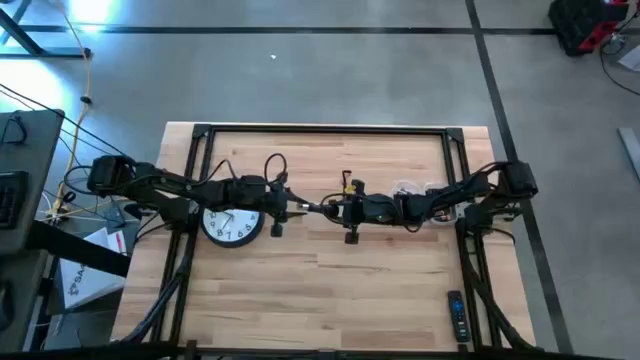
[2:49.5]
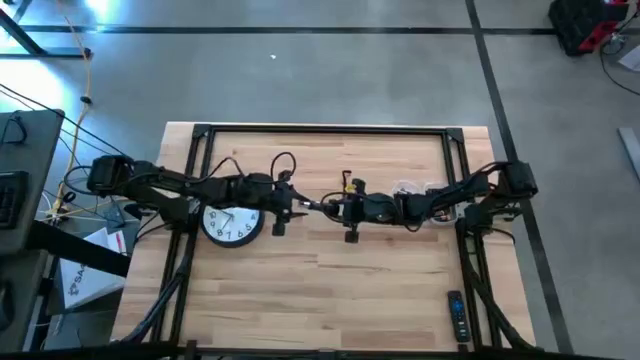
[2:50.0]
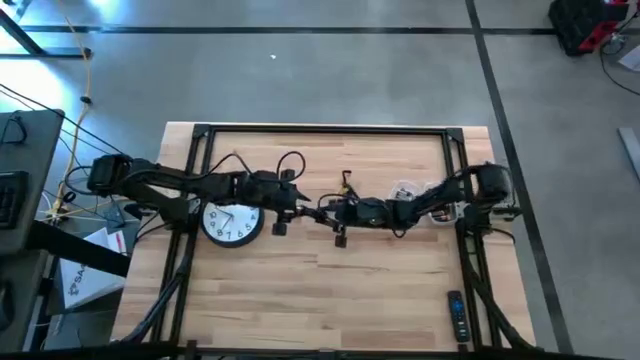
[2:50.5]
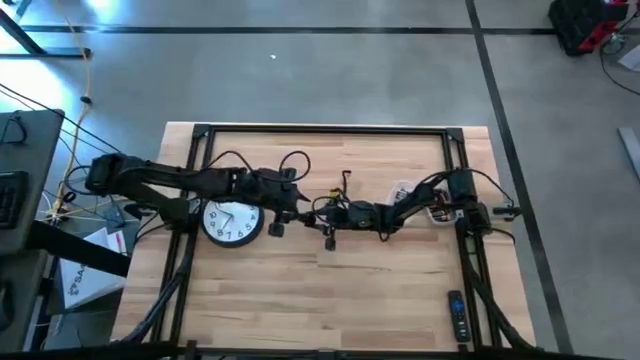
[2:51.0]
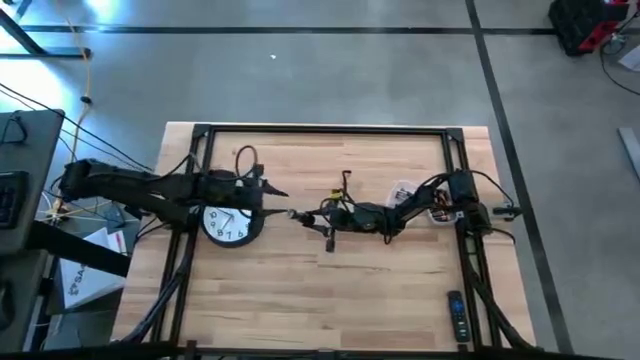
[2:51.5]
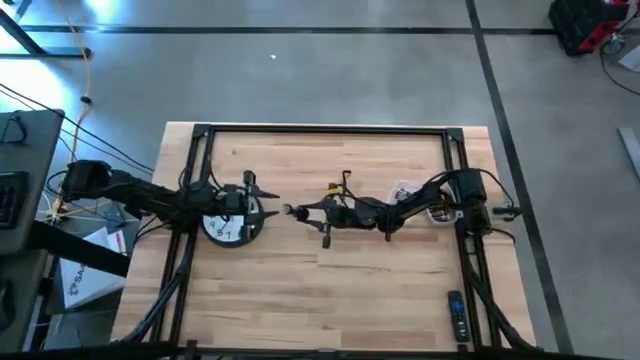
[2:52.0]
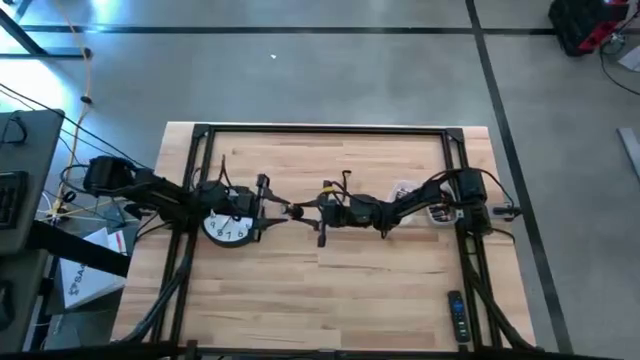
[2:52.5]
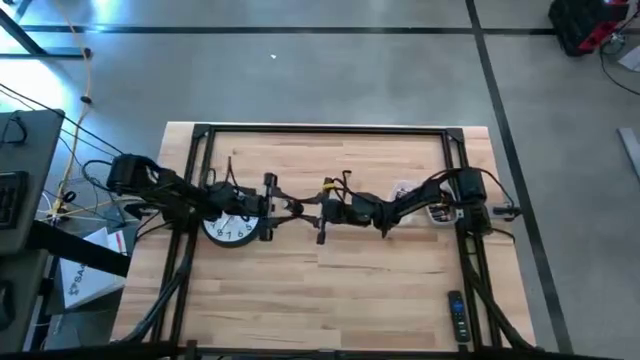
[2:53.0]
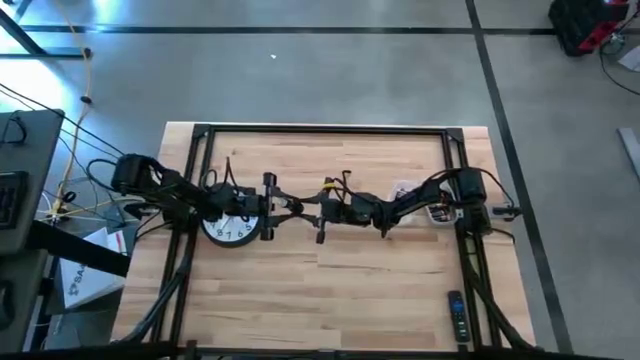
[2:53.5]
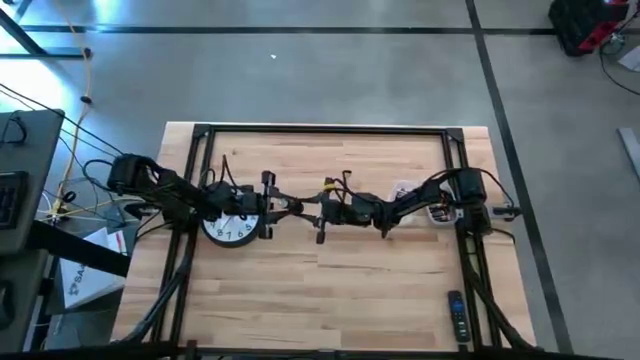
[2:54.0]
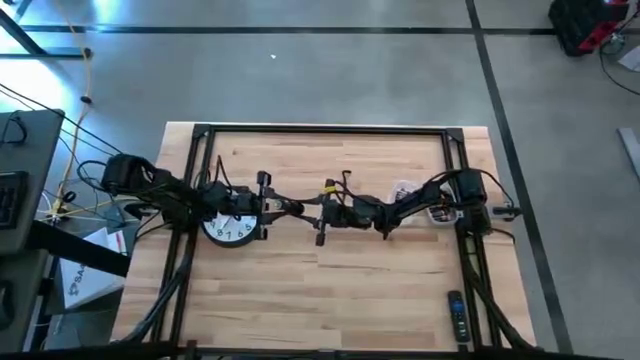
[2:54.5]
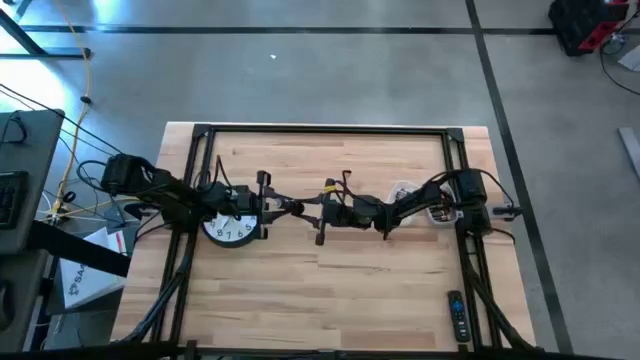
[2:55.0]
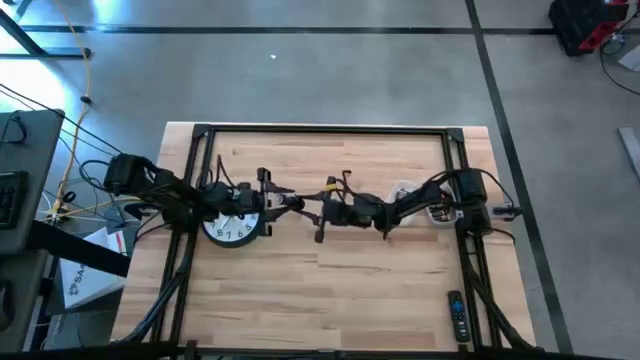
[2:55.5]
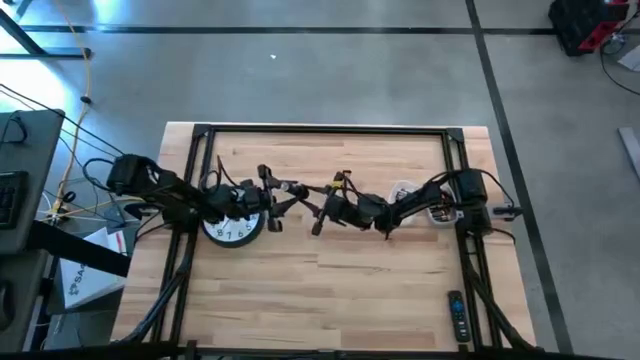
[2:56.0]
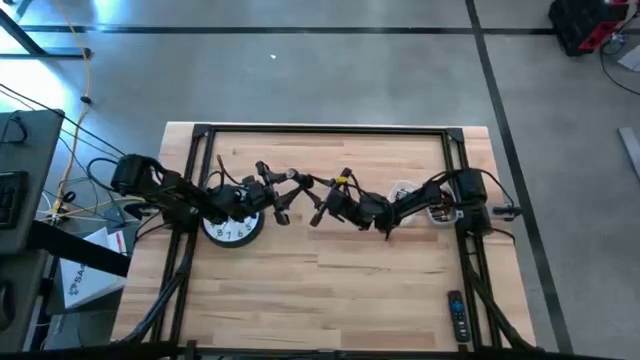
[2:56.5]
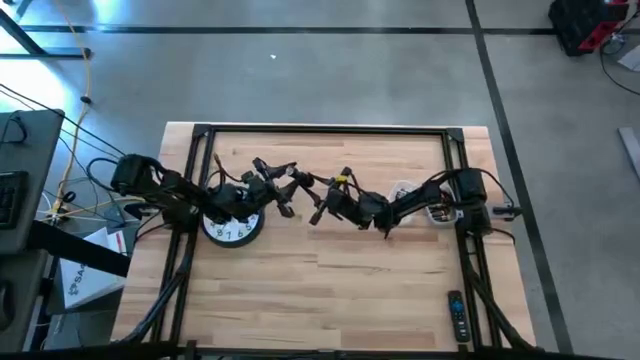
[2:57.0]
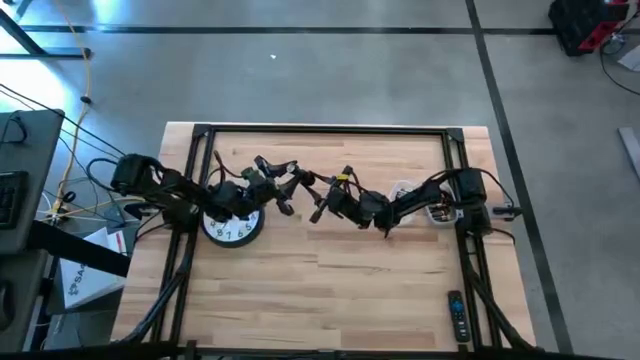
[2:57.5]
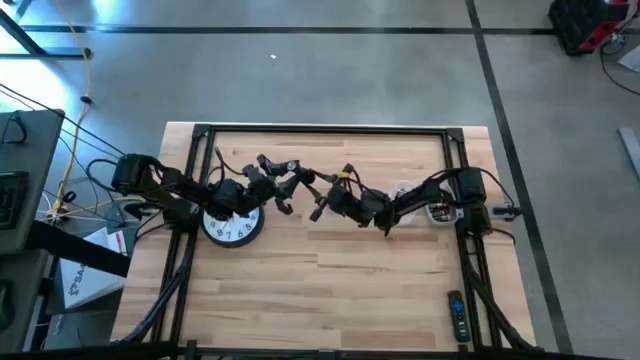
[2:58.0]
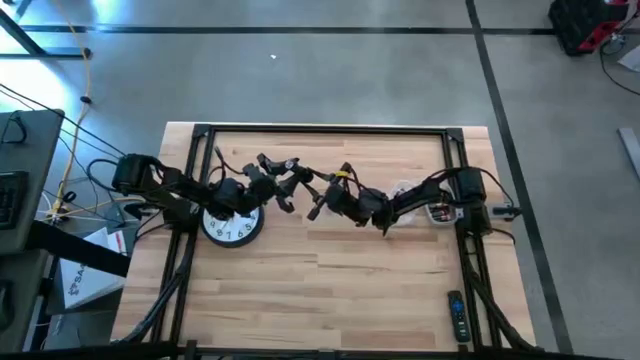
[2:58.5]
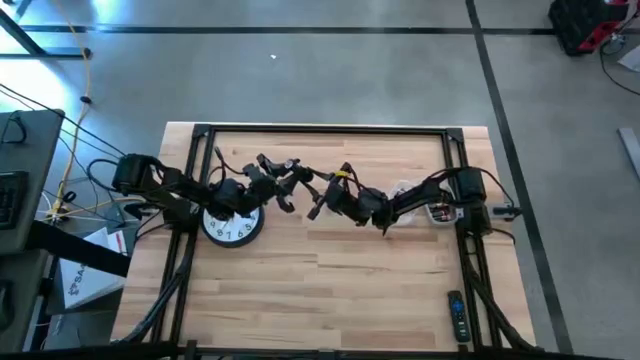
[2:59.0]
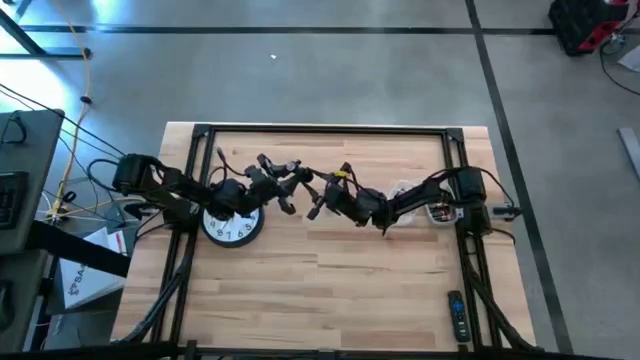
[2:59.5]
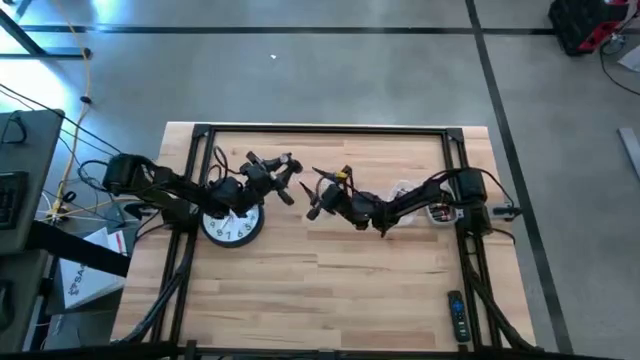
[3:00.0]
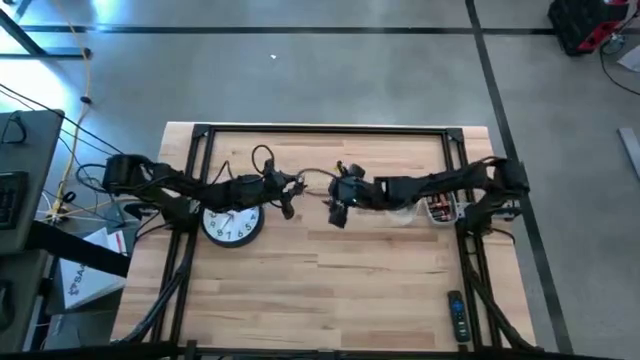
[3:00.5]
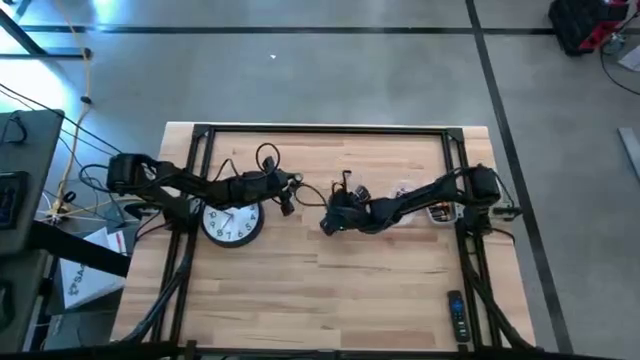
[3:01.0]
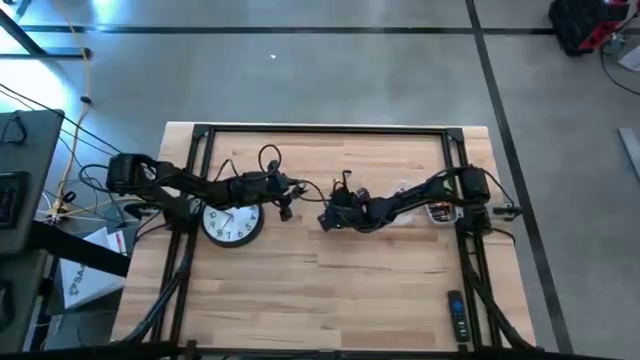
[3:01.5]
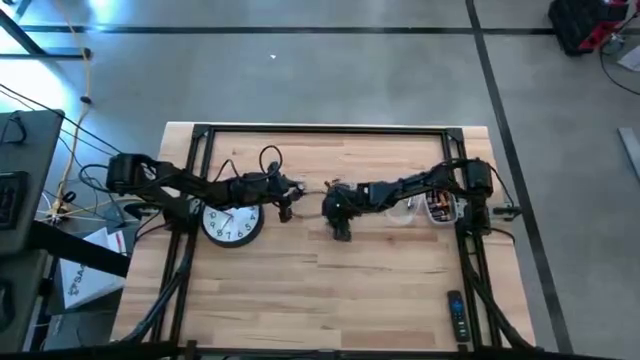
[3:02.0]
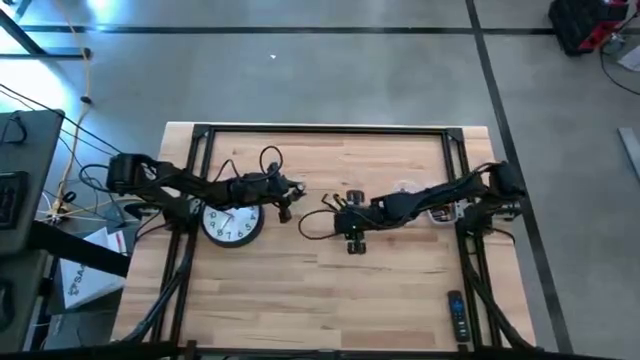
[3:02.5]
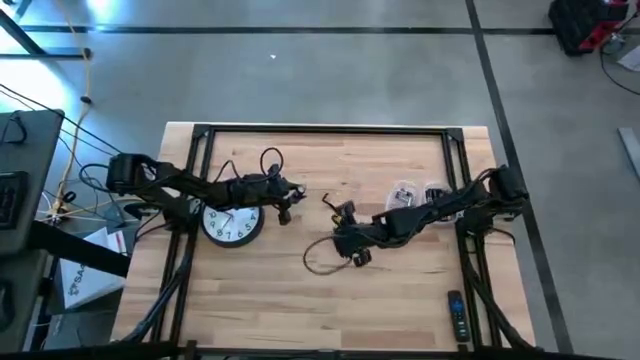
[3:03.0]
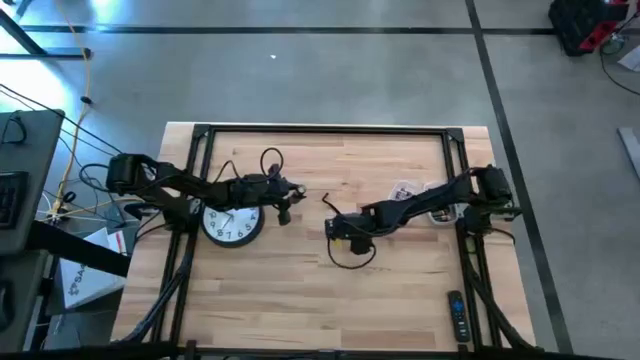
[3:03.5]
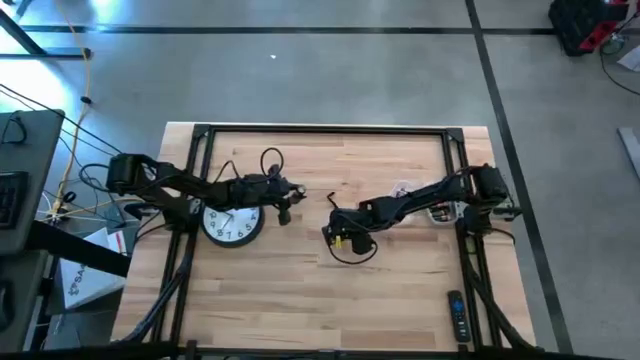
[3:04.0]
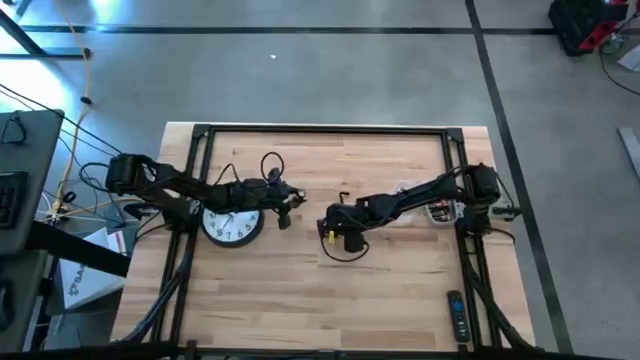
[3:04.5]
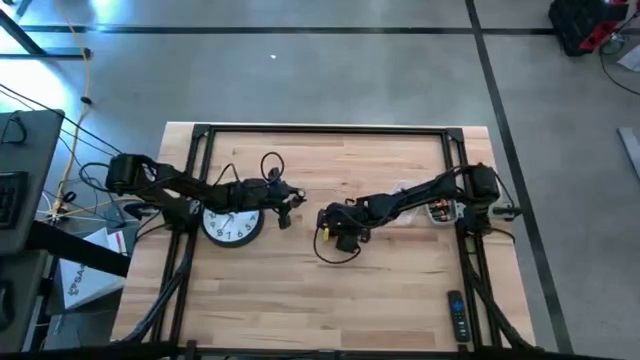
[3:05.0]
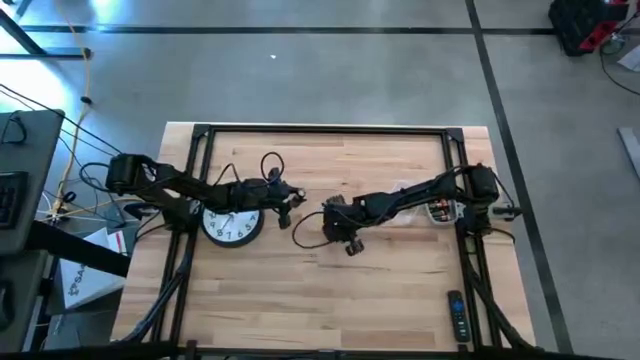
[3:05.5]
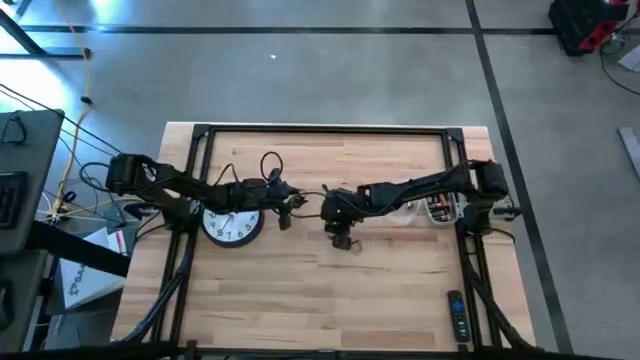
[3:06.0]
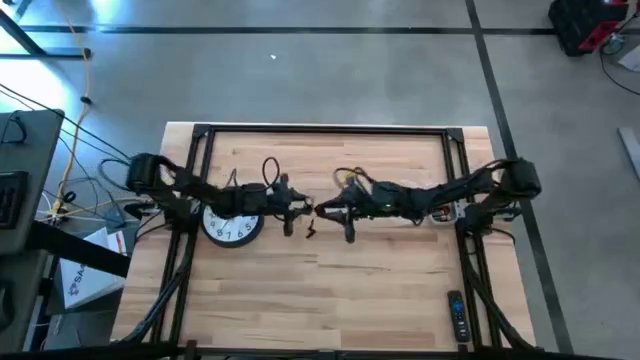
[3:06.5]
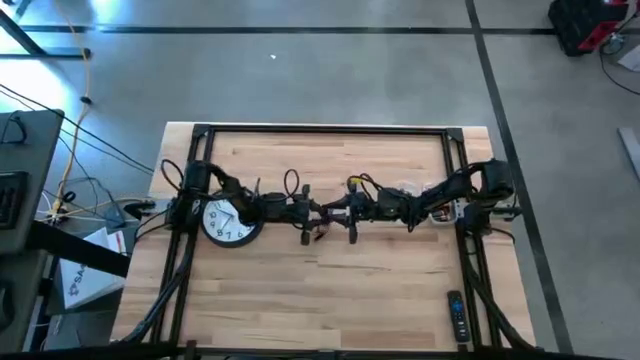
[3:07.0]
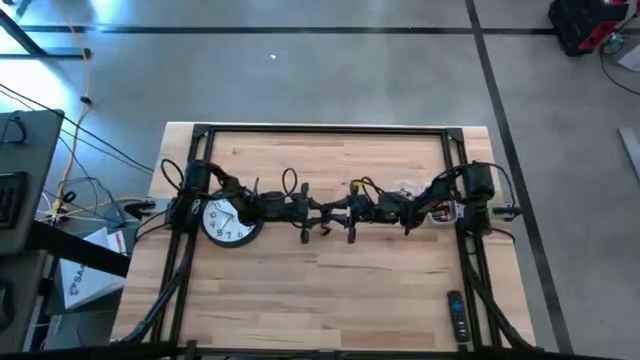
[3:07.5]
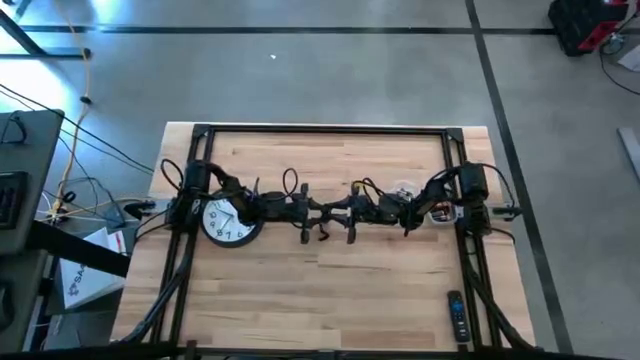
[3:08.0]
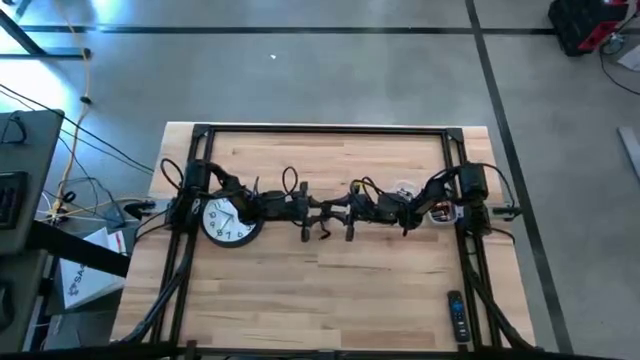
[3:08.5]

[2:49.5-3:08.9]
Task: Insert battery
Close the black flashlight lid

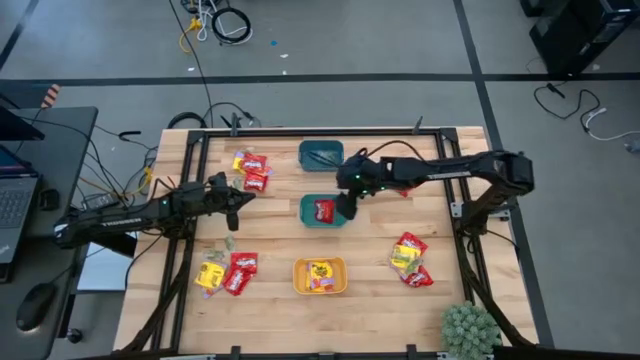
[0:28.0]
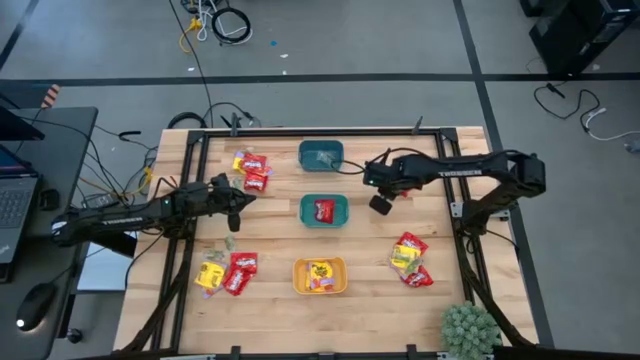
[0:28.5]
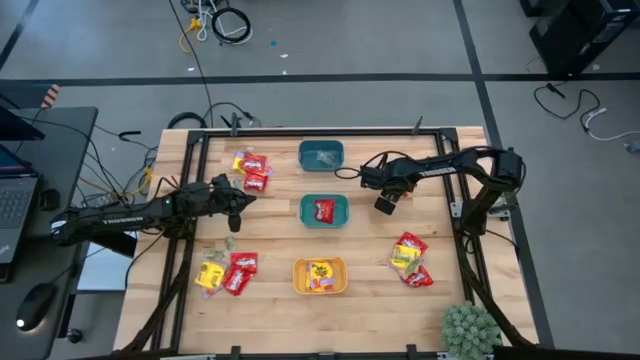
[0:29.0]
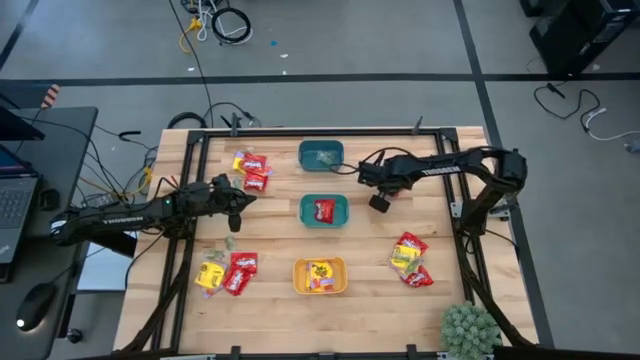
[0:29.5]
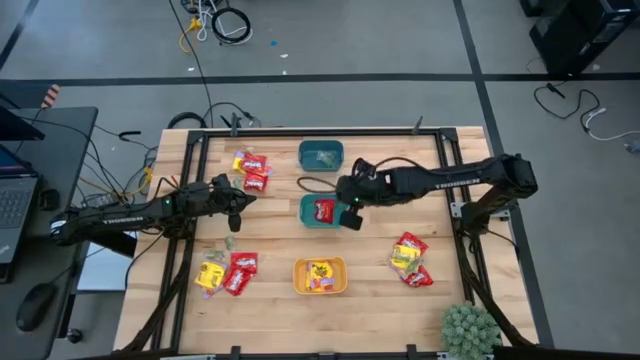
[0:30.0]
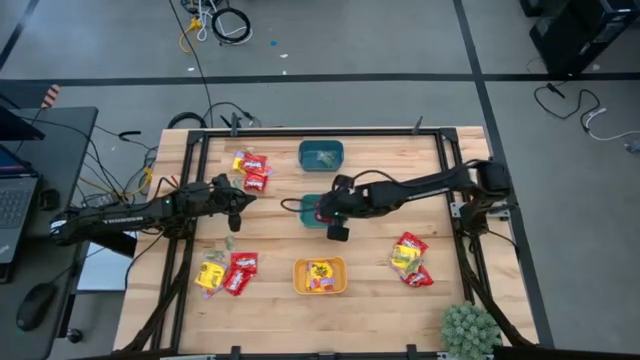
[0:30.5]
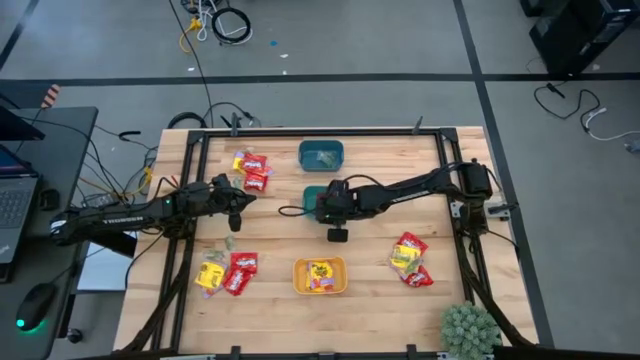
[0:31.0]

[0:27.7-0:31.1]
Task: Sort candy
Put the red candy into the green bin
